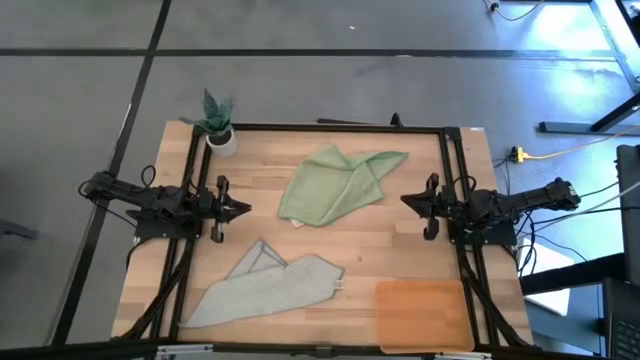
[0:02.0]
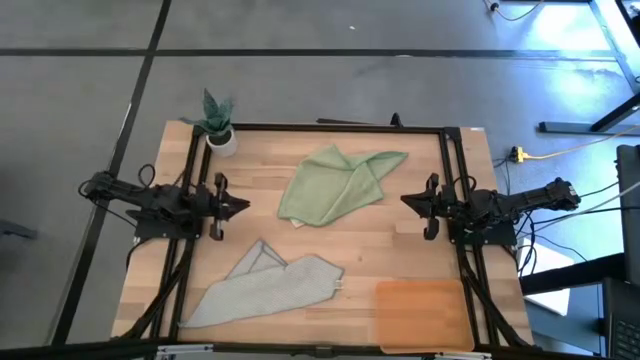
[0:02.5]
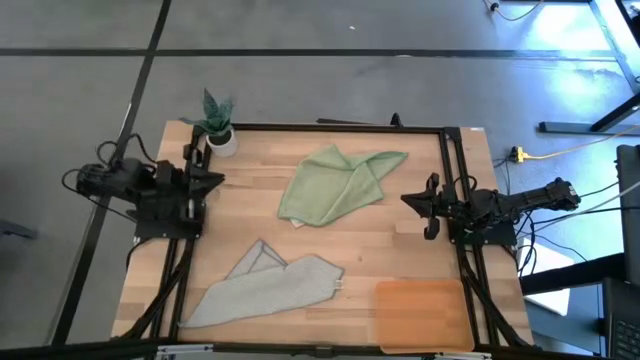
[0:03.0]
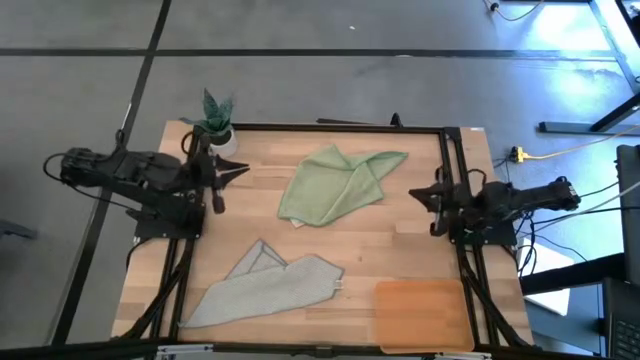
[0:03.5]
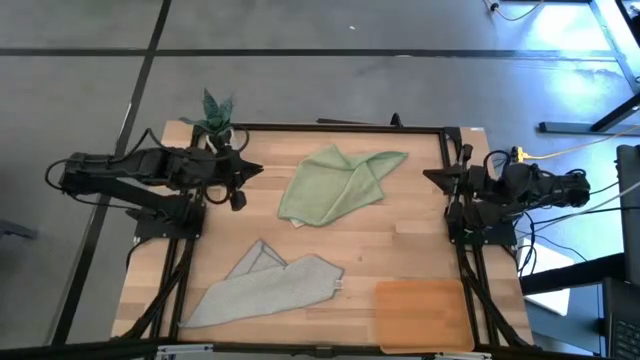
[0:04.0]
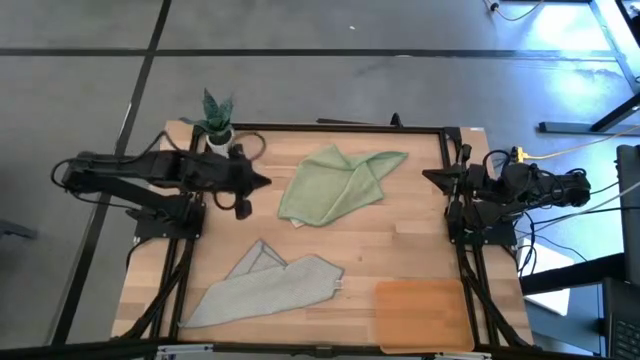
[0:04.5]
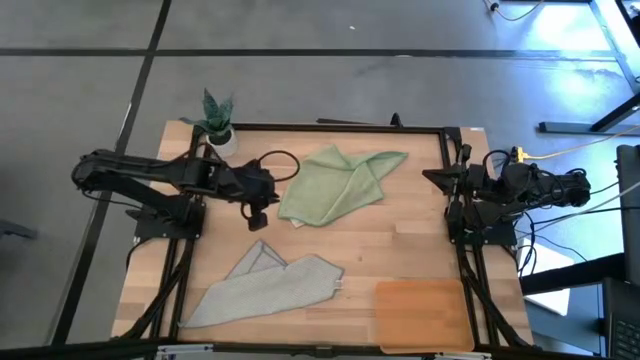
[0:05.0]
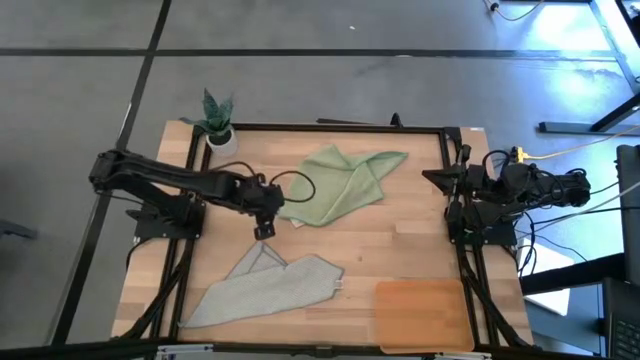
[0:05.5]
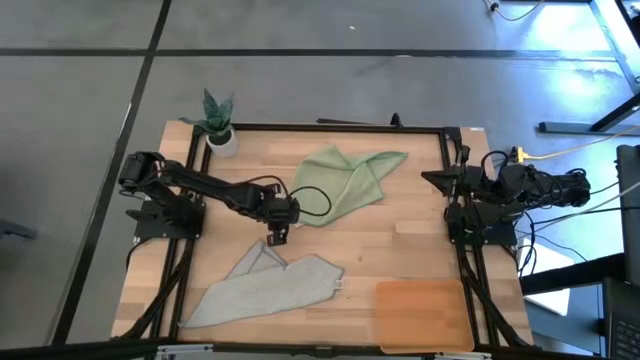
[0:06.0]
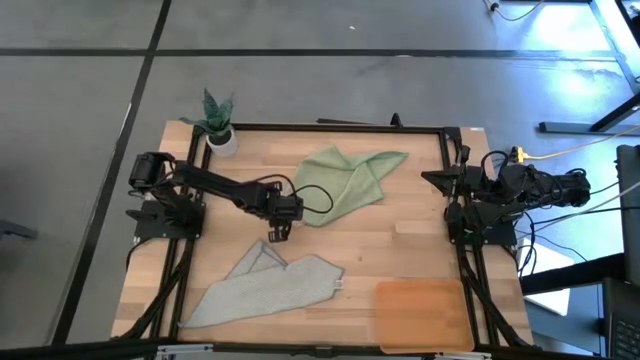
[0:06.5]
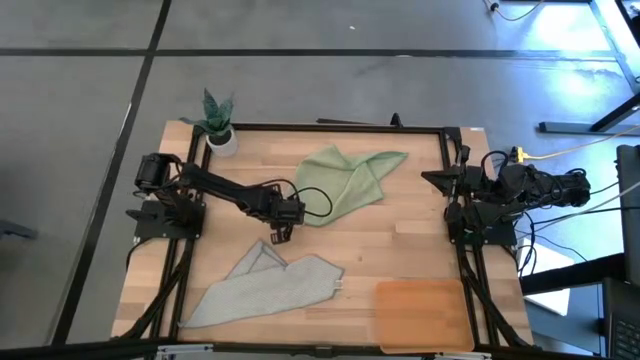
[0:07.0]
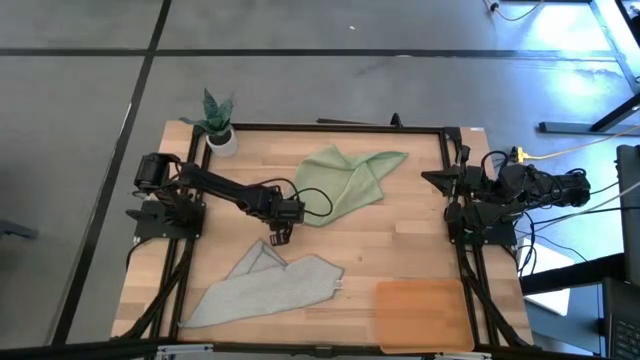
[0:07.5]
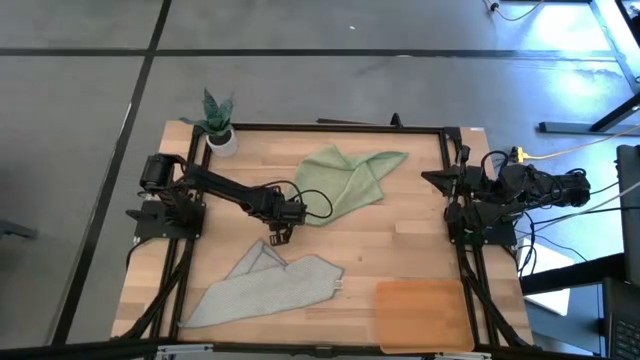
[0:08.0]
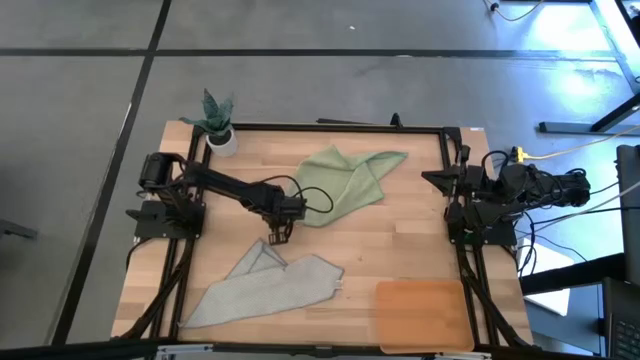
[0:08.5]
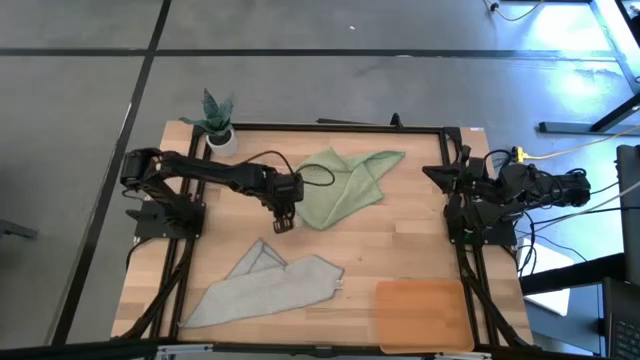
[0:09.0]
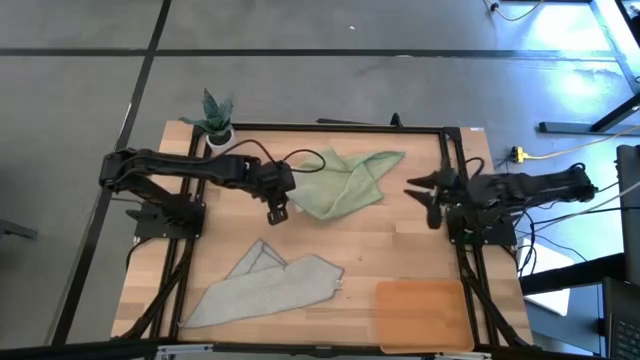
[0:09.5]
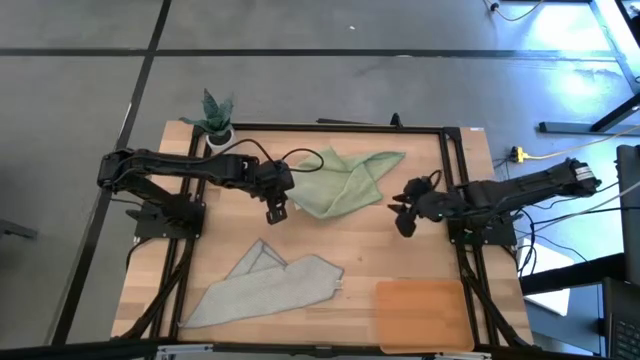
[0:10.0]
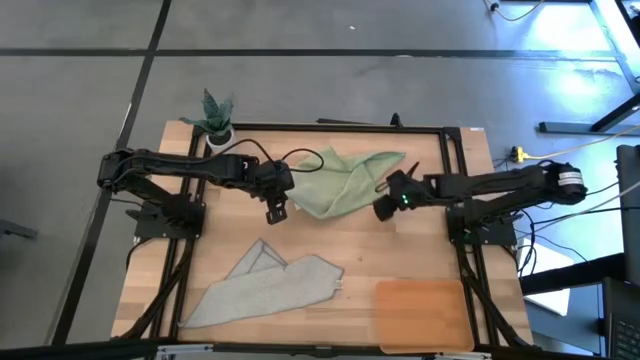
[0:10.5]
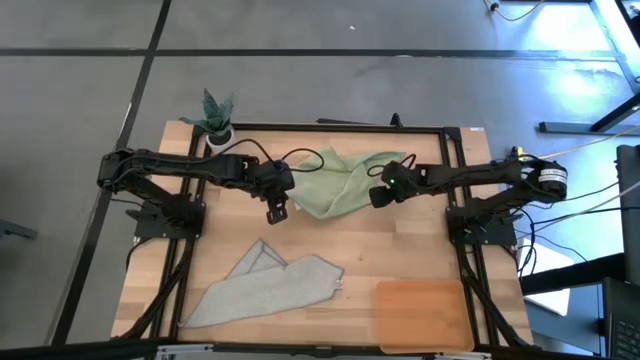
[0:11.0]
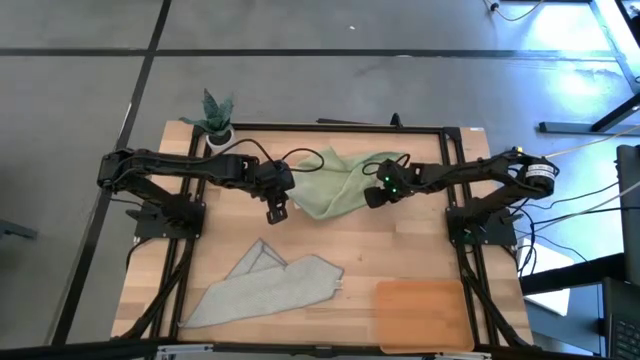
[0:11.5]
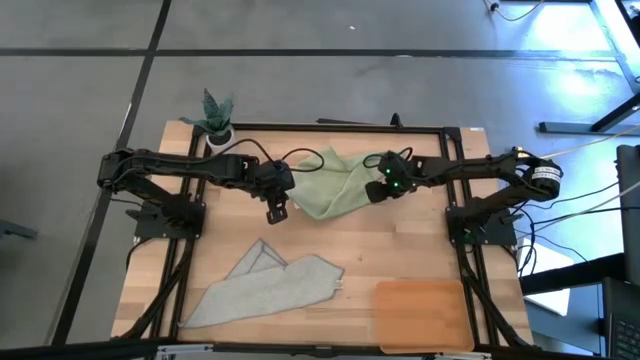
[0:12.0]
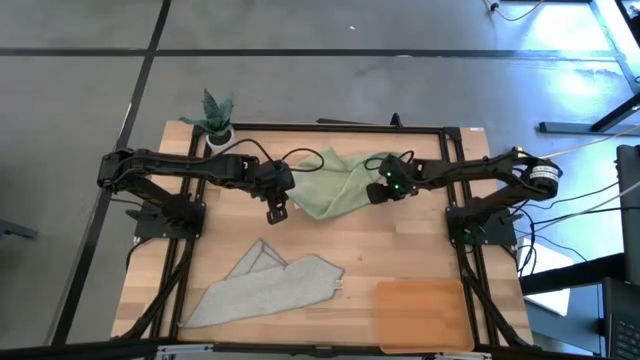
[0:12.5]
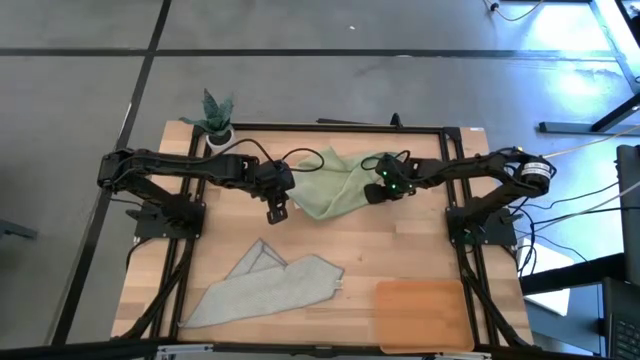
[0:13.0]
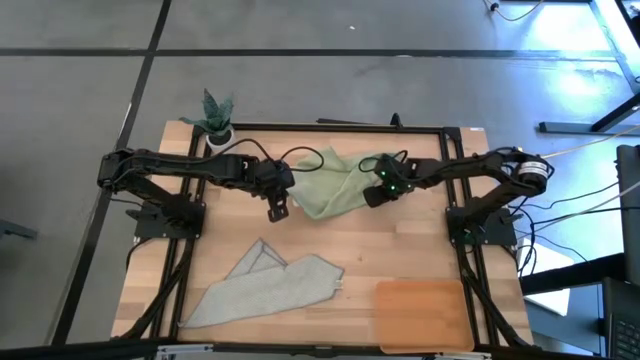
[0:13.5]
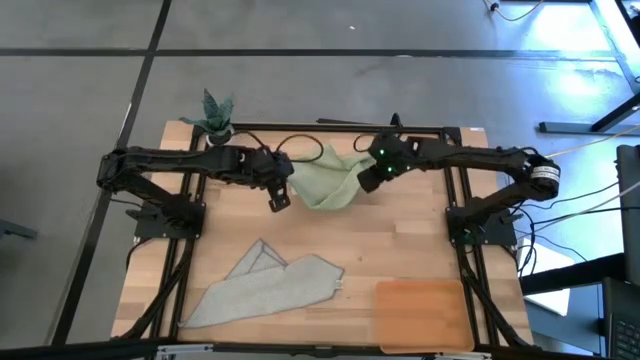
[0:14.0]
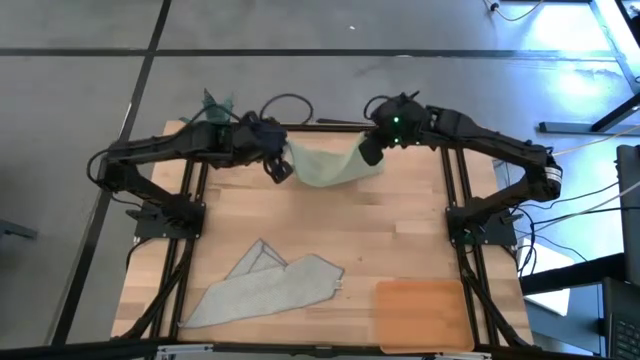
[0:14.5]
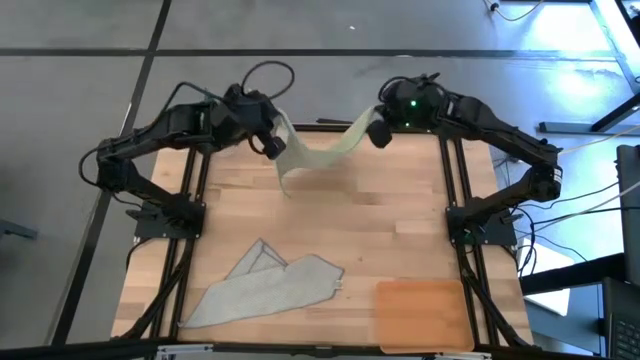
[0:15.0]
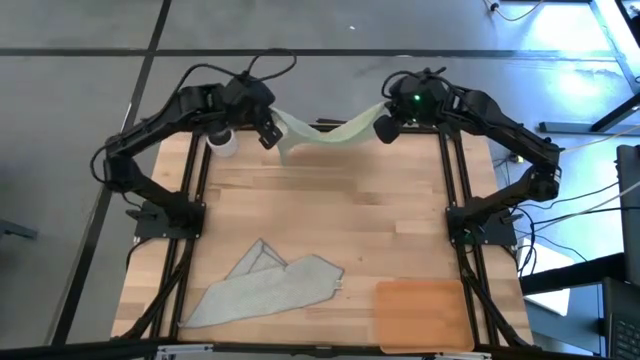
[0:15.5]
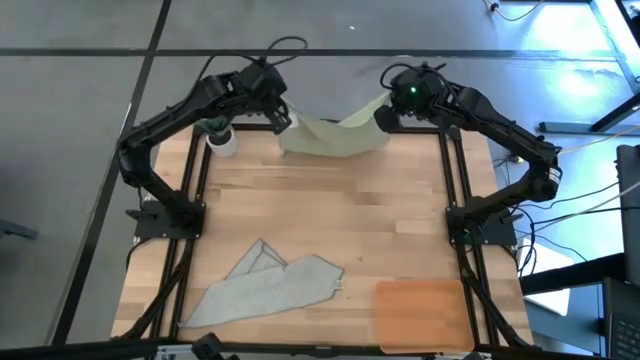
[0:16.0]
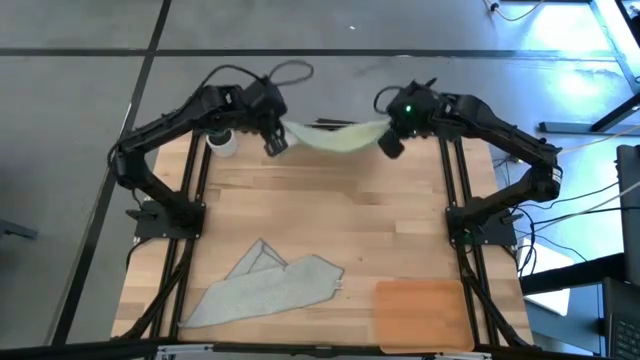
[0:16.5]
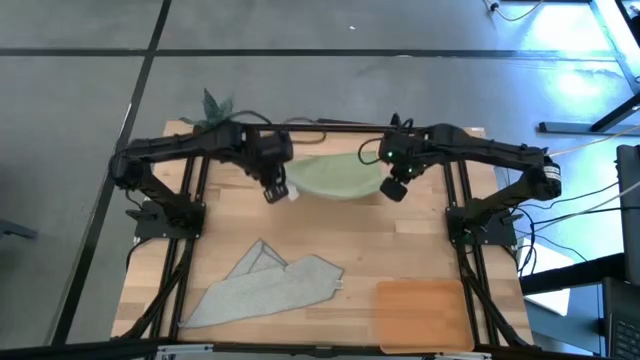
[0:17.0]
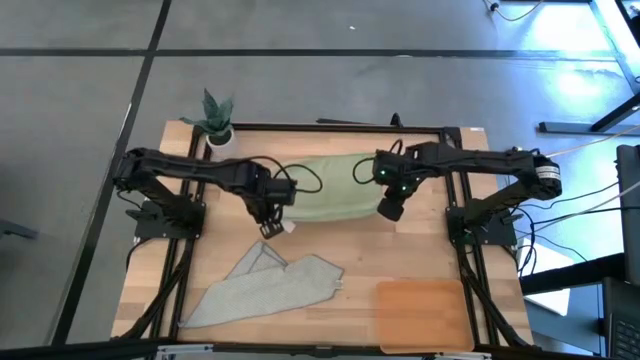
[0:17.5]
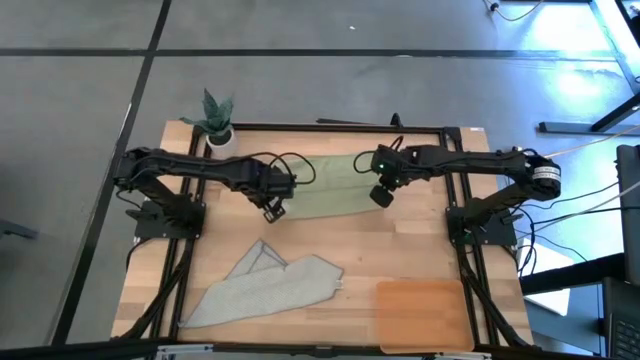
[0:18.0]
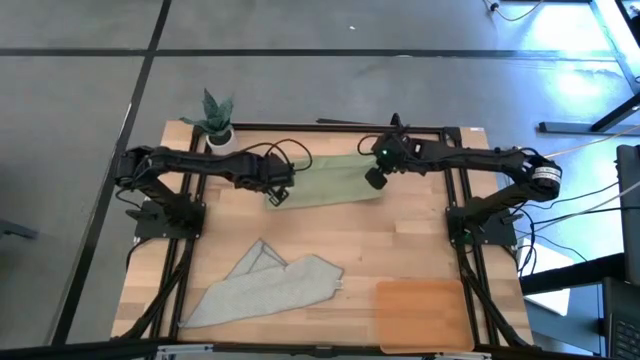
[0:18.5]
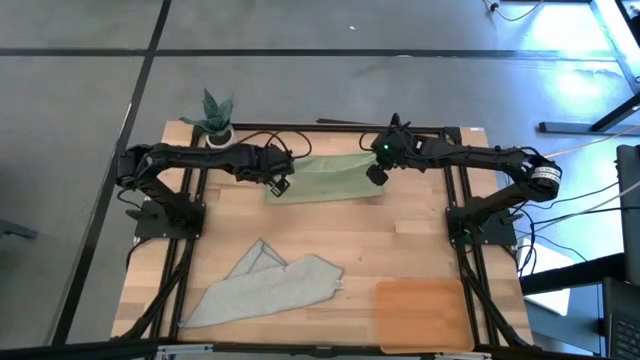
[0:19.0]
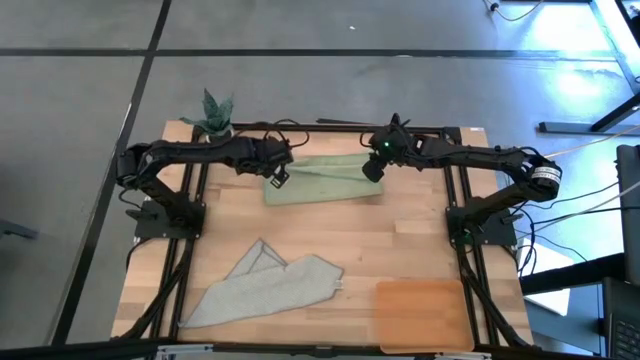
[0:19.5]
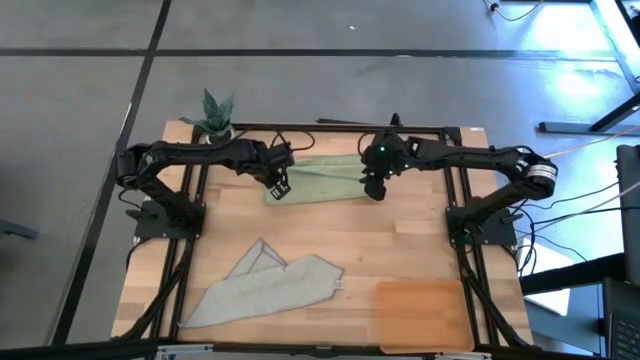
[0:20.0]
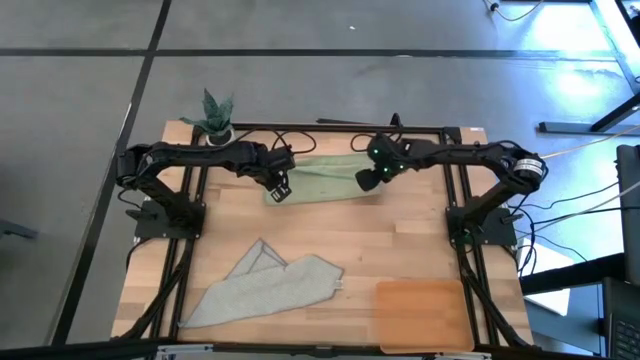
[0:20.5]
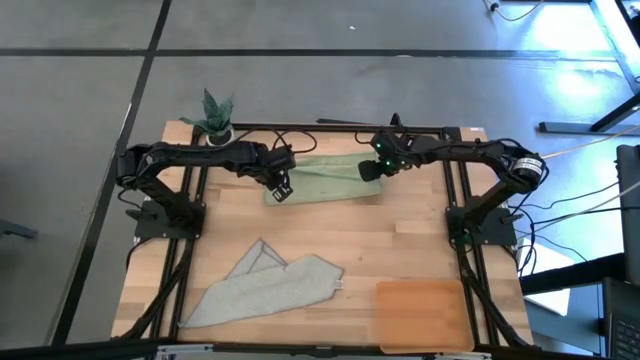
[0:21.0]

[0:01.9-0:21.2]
Task: Roll microfiber towels into tight, uniform cylinder then place into a basket
Roll the green microfiber towel
